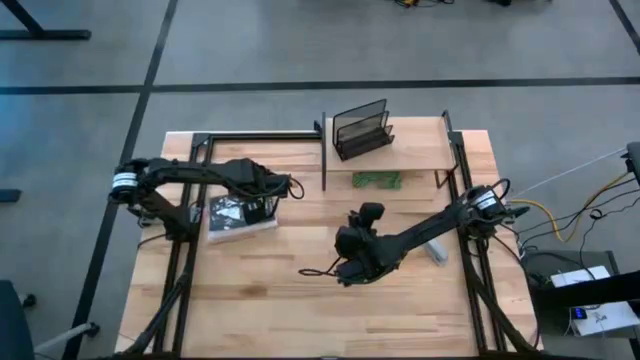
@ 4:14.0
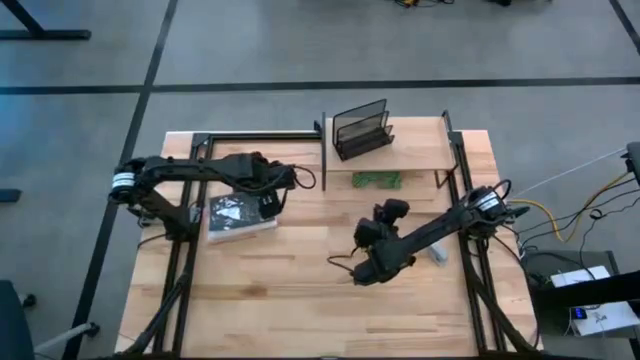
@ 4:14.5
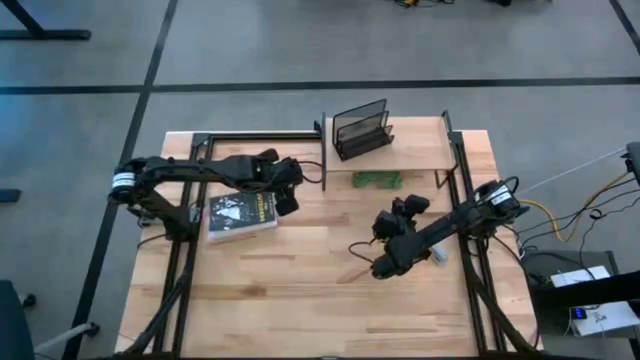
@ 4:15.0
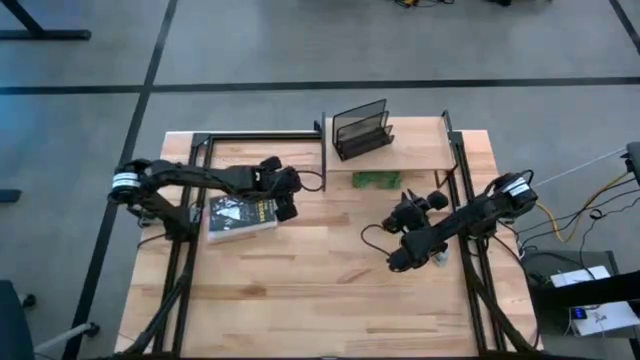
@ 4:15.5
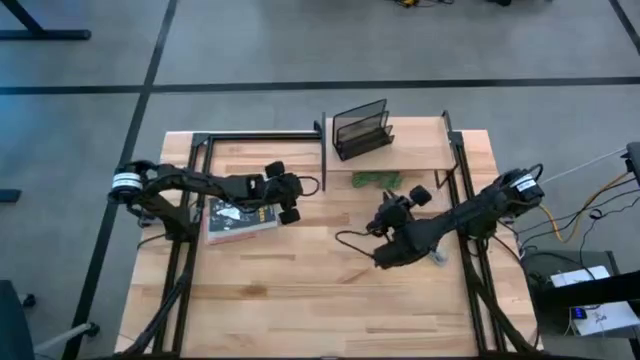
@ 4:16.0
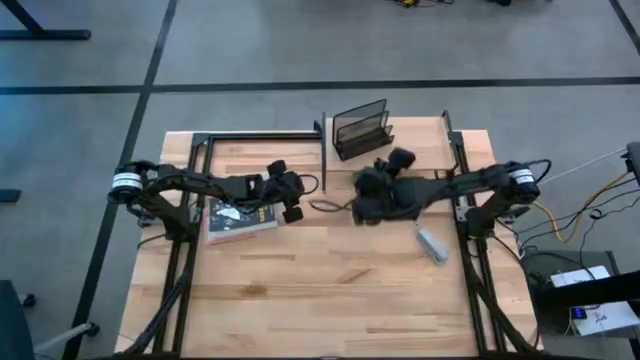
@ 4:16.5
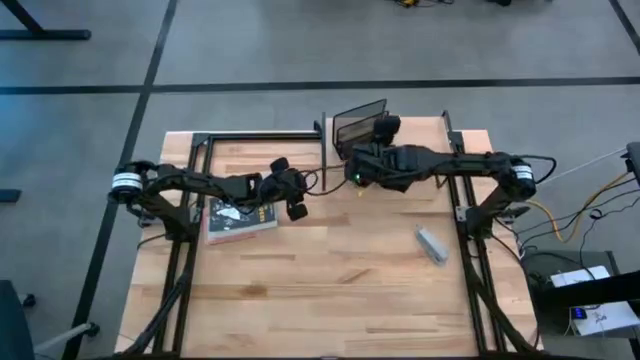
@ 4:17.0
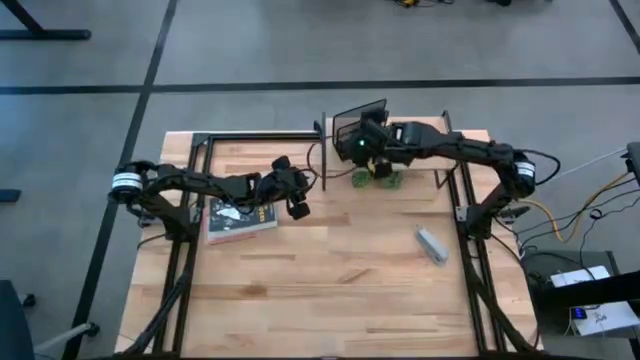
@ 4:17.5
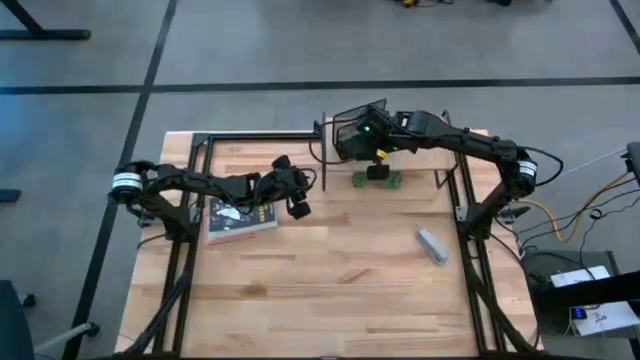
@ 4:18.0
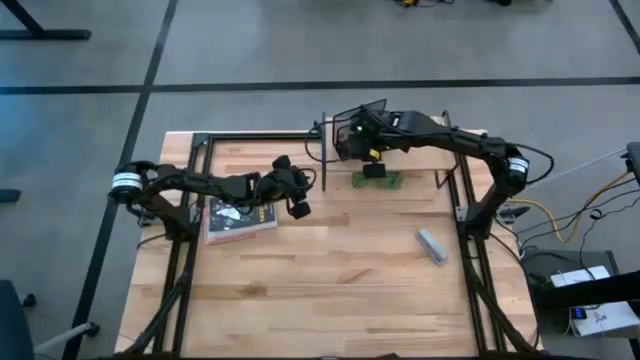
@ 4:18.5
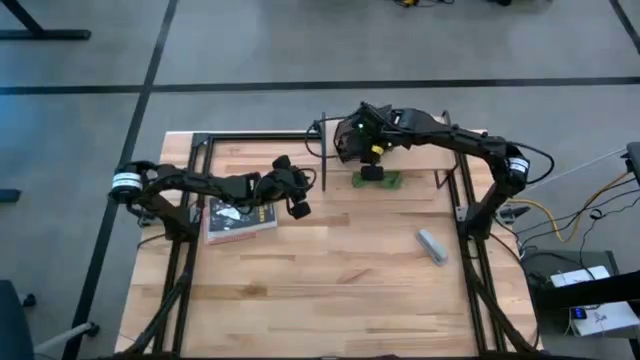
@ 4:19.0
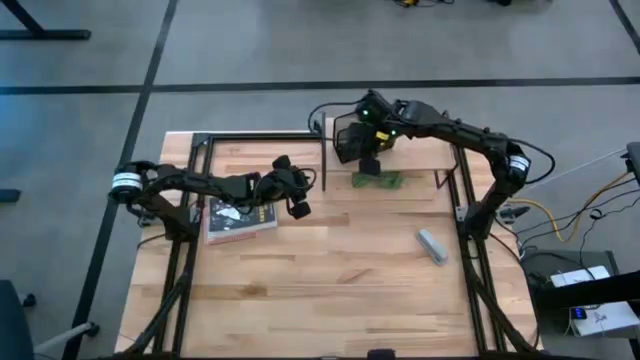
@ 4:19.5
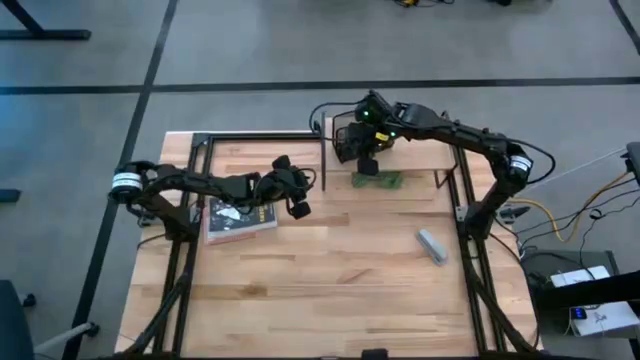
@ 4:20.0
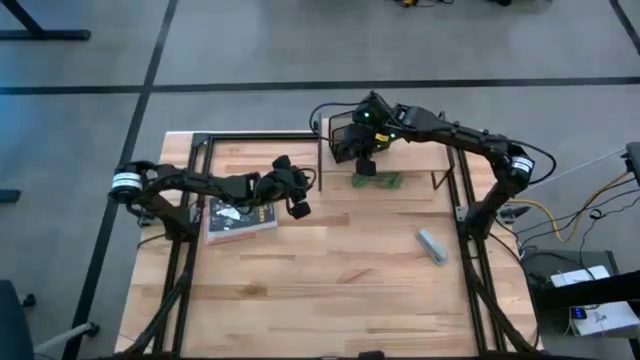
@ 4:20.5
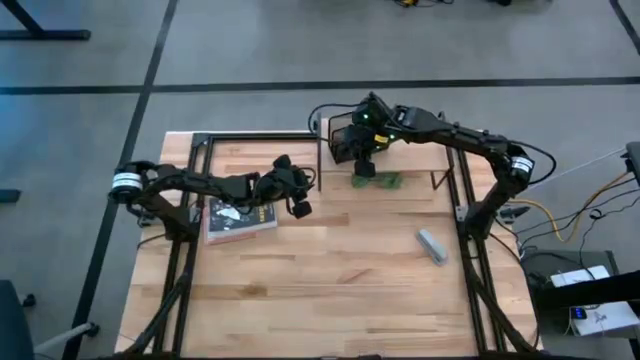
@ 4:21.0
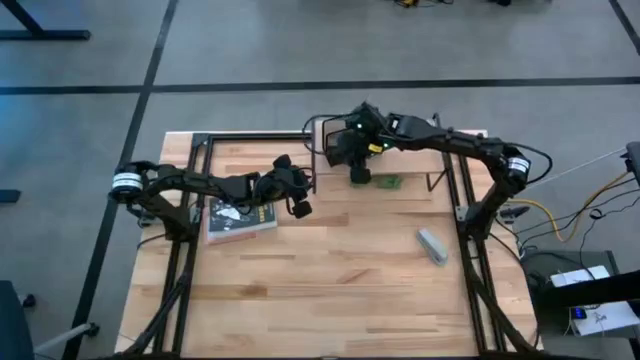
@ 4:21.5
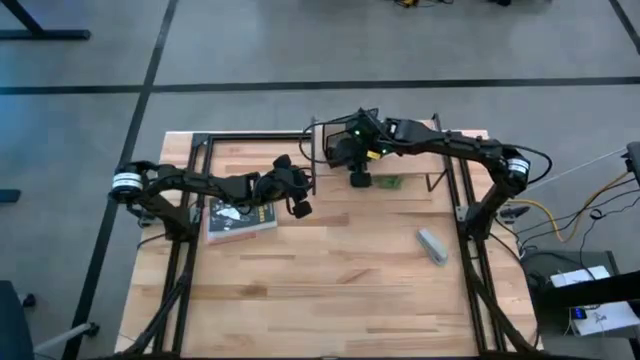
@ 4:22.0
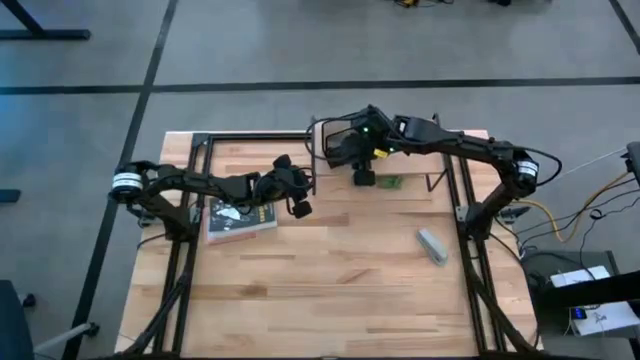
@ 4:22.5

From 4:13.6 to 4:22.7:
Task: Stock shelves
Remove the black desk organizer from the shelf

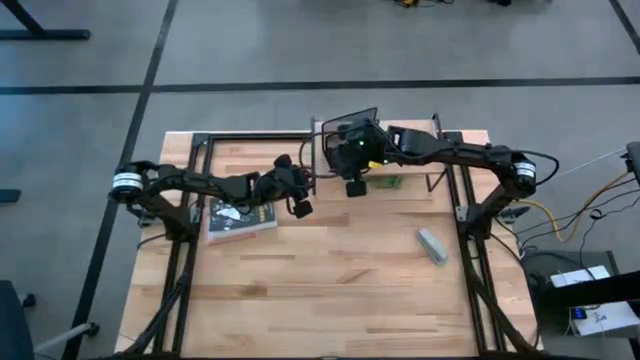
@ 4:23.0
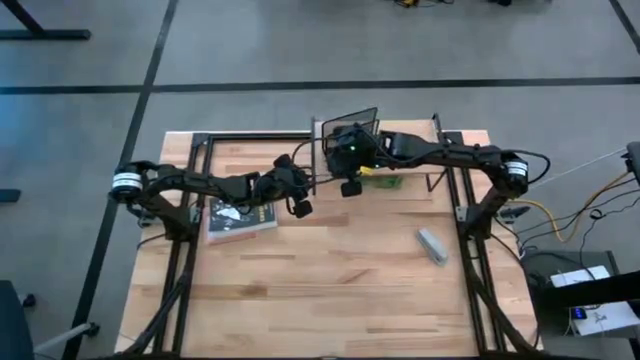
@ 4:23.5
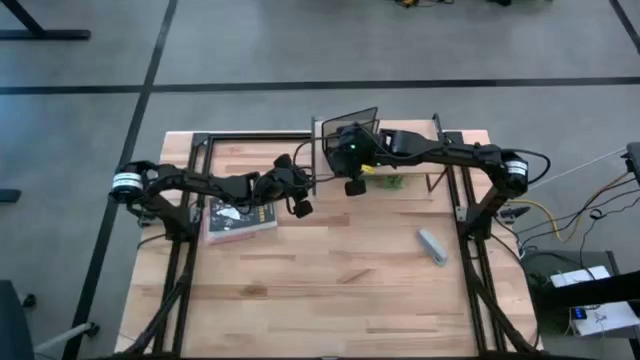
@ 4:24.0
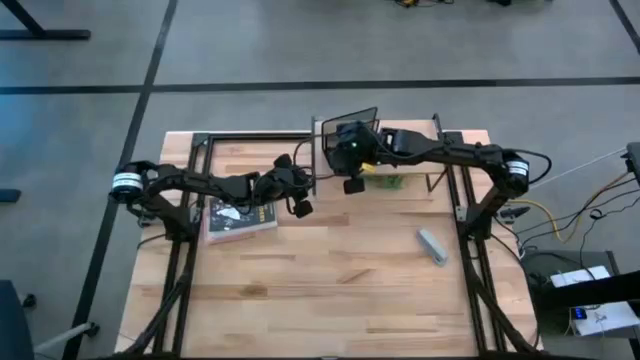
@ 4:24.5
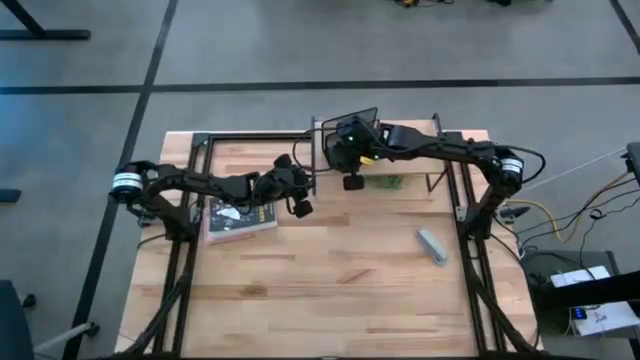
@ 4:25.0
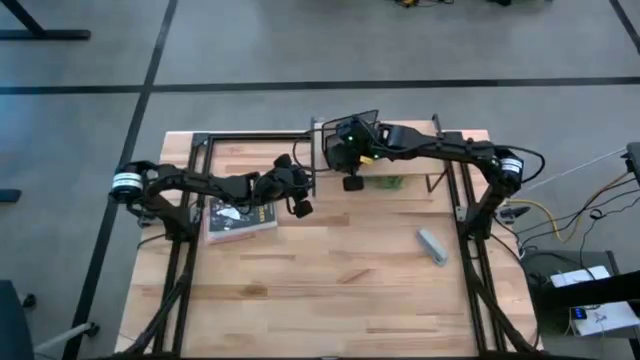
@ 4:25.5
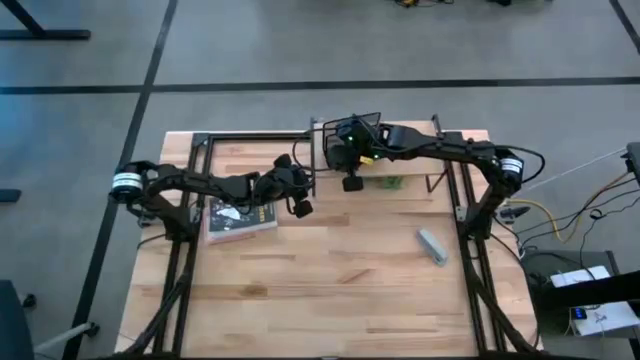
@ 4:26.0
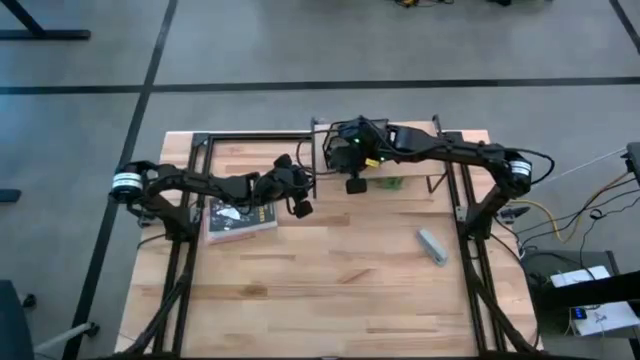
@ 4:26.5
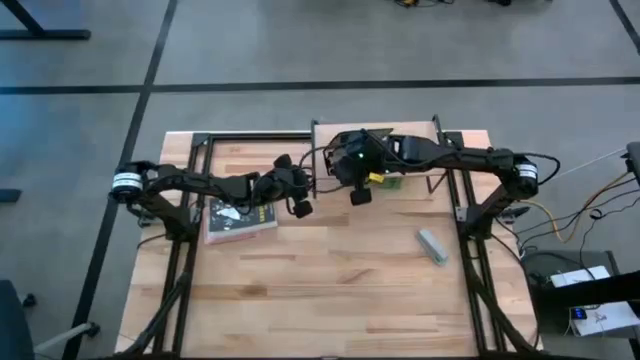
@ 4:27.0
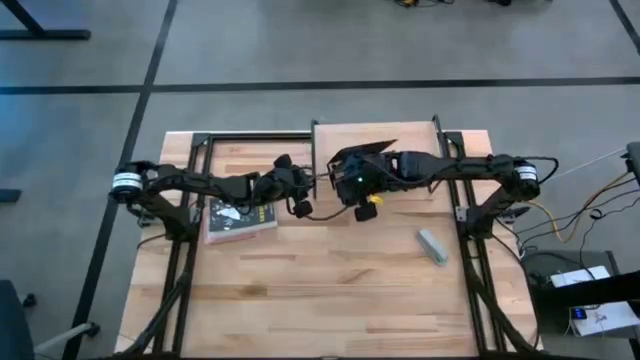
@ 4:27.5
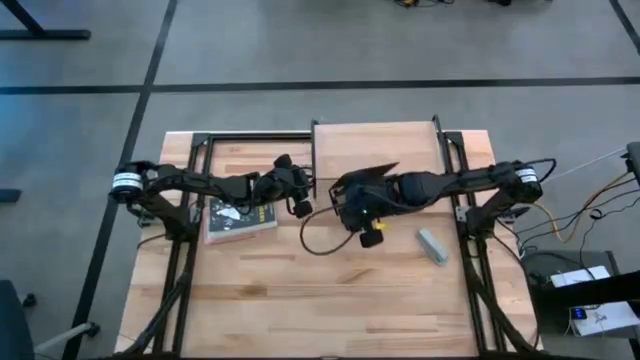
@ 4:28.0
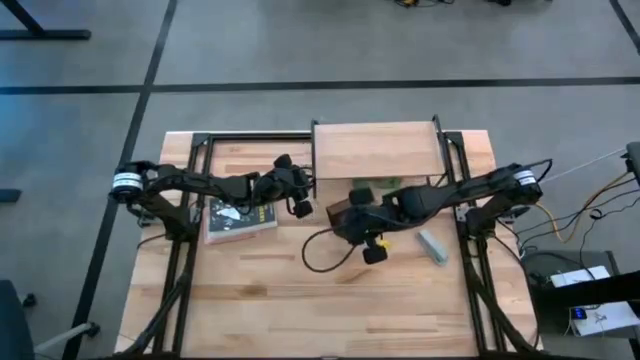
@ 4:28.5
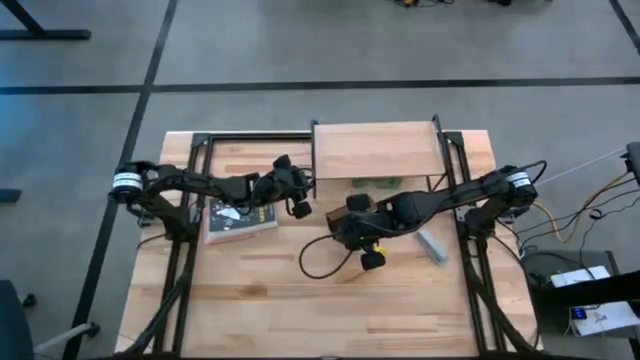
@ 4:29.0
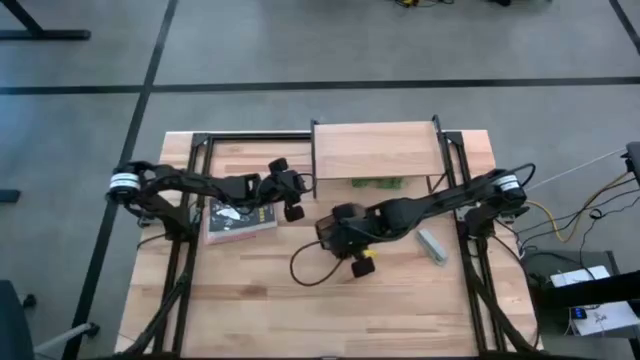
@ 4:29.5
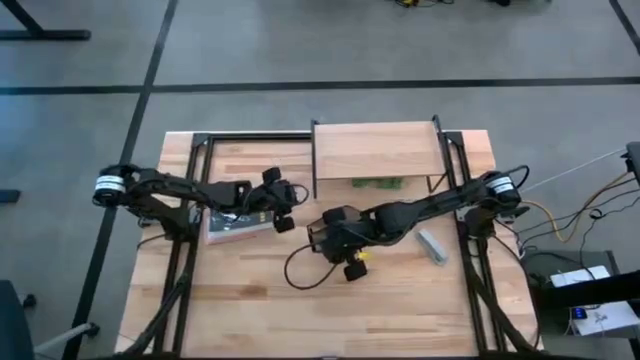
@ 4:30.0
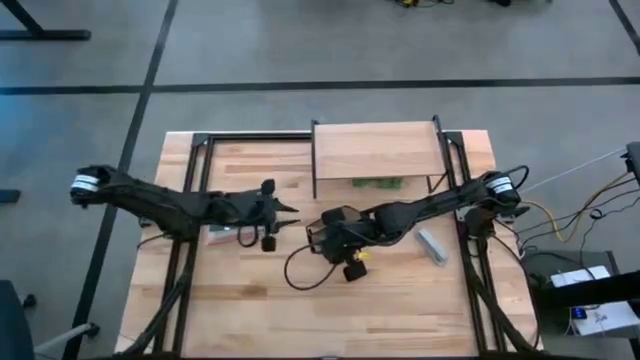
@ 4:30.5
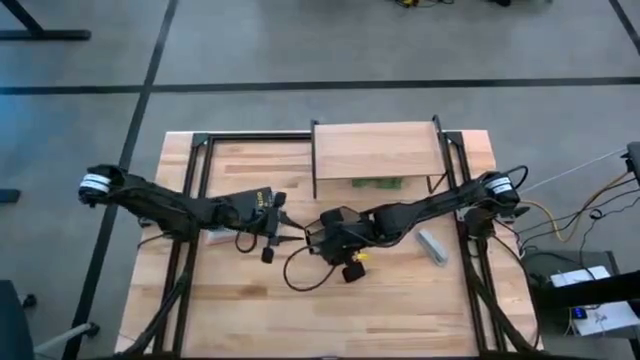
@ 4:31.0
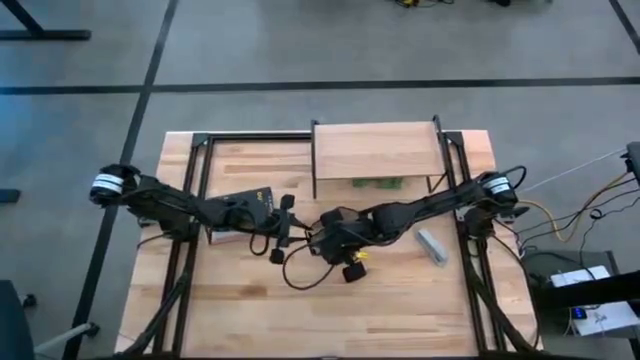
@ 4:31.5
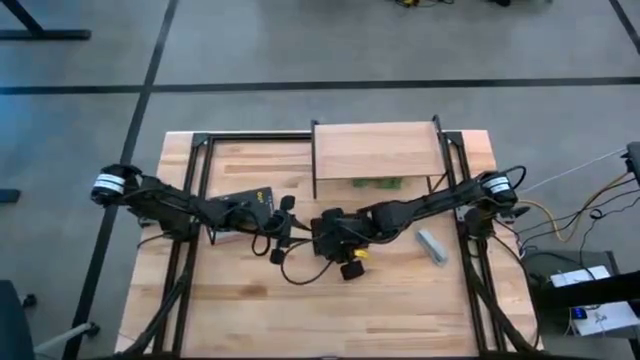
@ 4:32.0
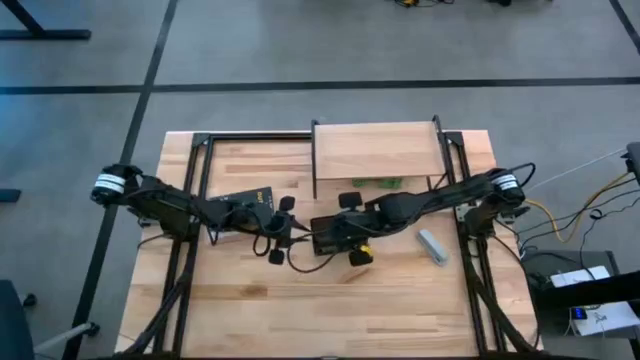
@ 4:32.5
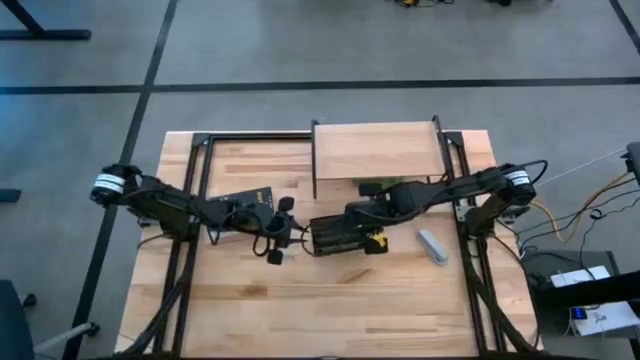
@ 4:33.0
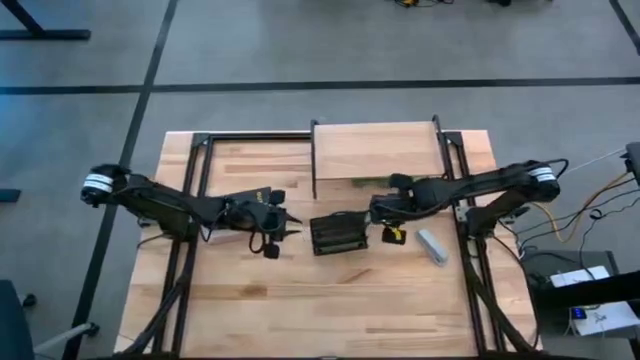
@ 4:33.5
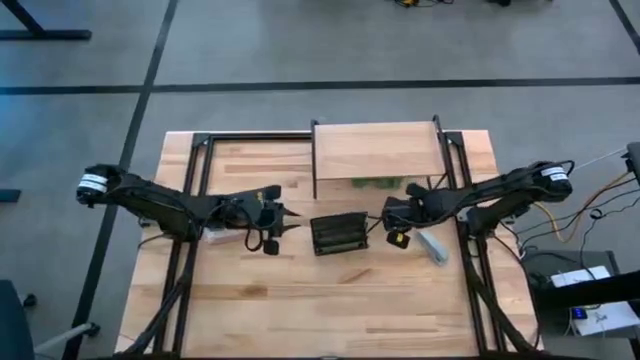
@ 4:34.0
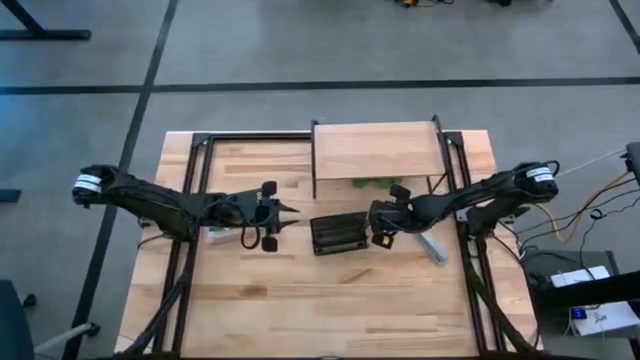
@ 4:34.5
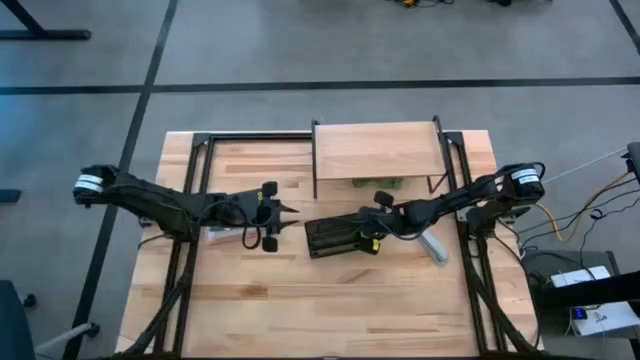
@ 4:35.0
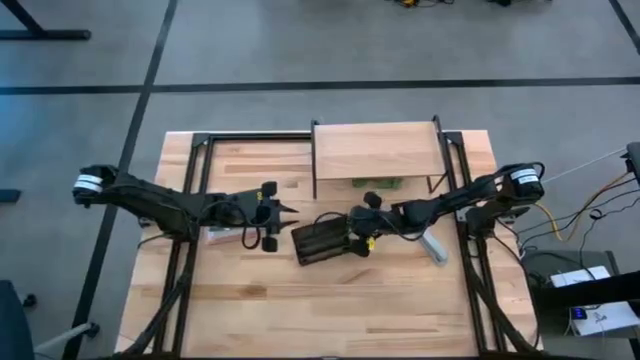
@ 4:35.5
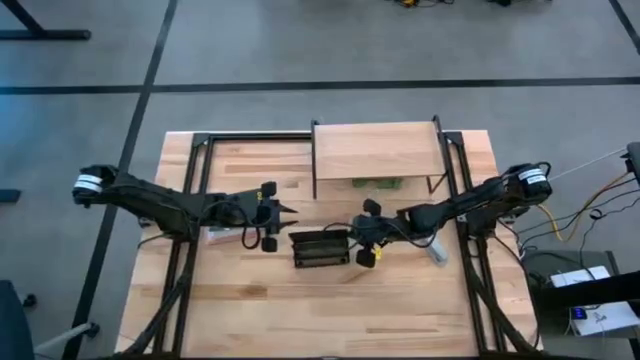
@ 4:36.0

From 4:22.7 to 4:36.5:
Remove the black desk organizer from the shelf
